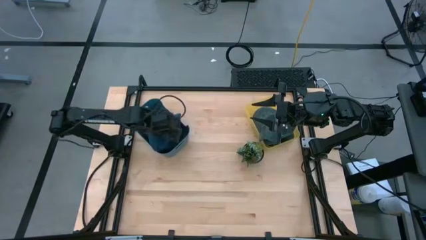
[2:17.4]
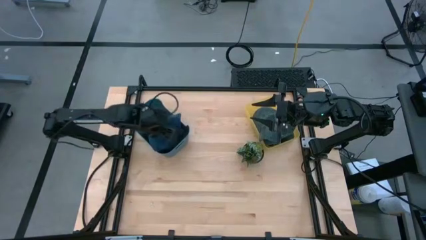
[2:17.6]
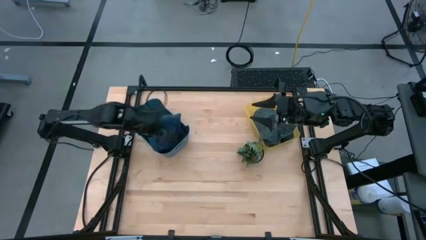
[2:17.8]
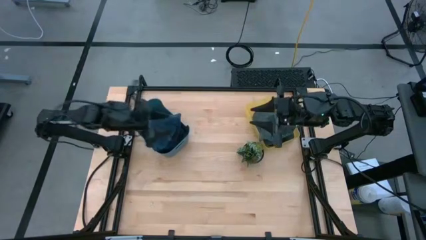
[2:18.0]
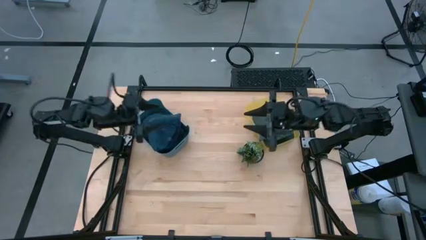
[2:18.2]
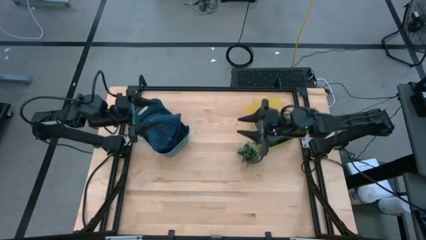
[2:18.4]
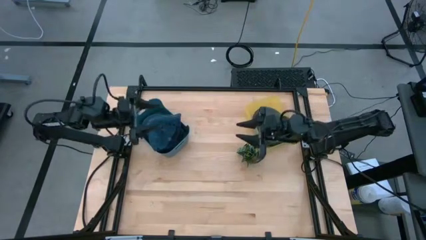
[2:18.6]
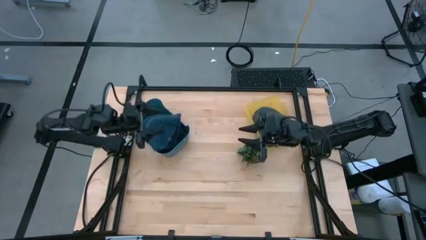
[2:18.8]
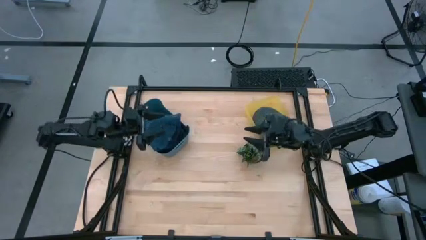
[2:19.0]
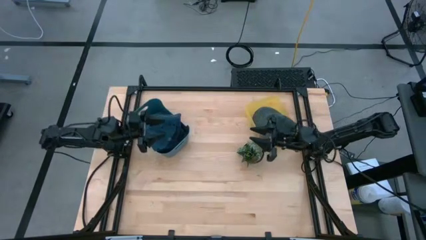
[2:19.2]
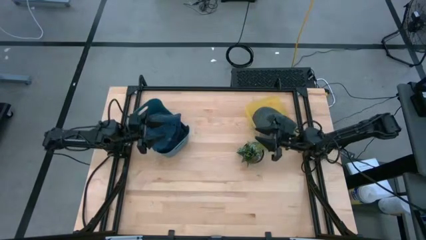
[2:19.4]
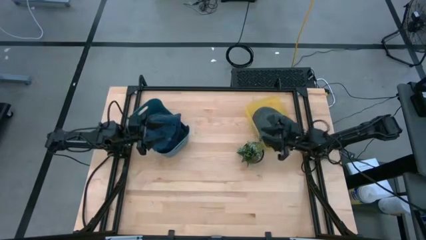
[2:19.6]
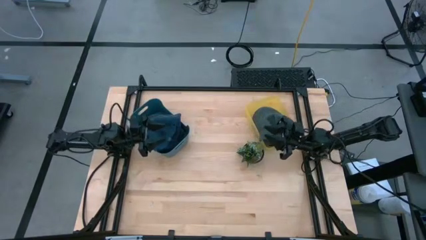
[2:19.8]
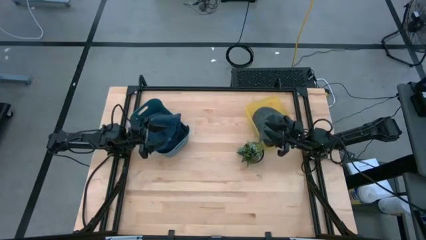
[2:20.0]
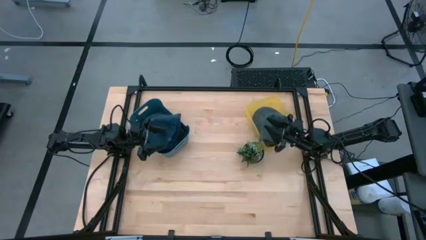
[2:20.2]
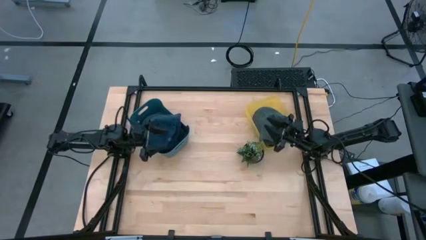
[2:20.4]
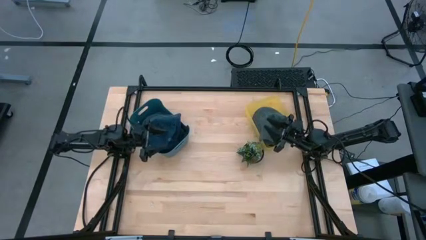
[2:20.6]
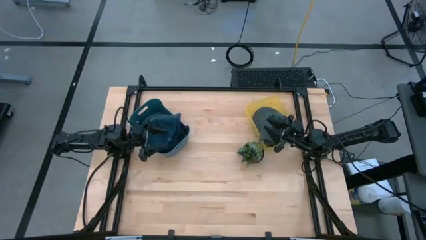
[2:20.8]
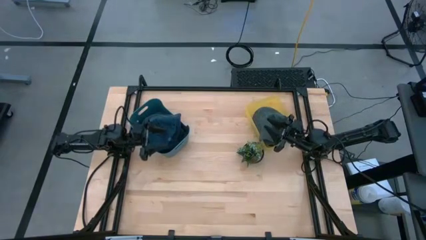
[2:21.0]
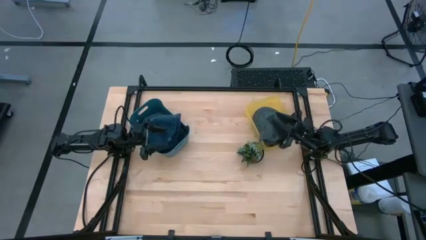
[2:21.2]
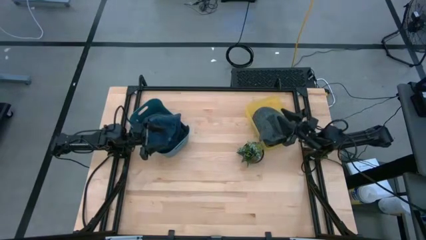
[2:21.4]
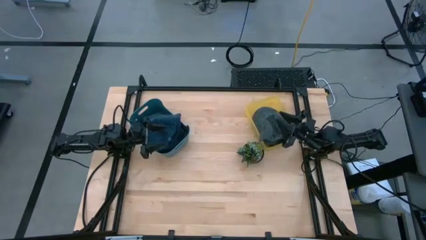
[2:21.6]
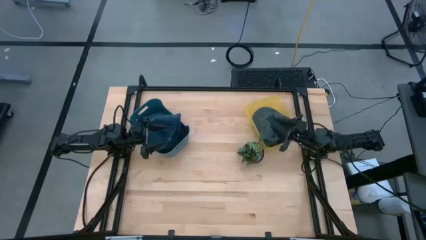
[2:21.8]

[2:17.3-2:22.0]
Task: Pick & Place hat
Return to Home Position

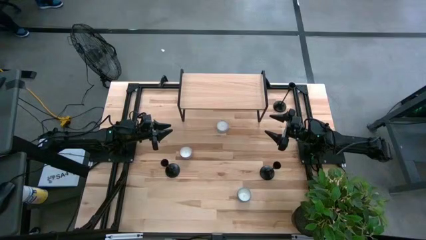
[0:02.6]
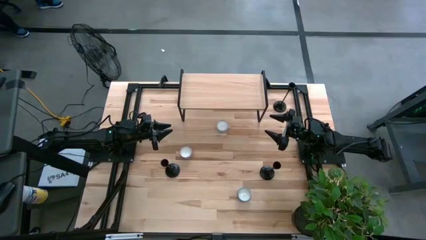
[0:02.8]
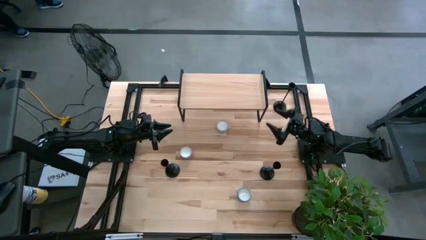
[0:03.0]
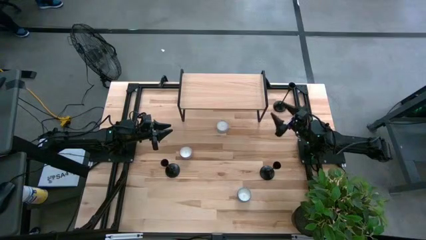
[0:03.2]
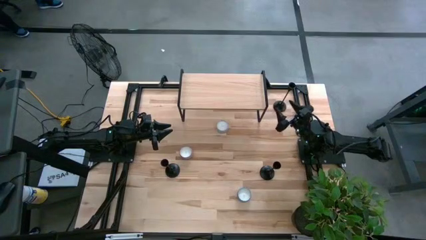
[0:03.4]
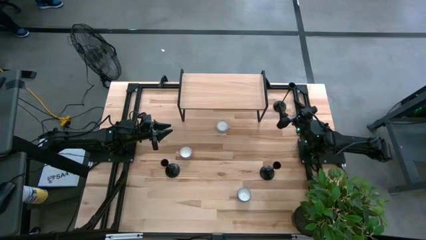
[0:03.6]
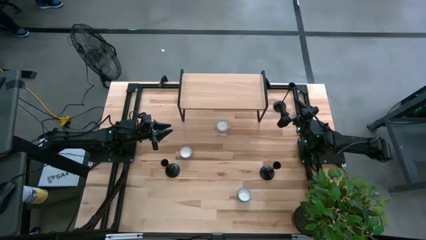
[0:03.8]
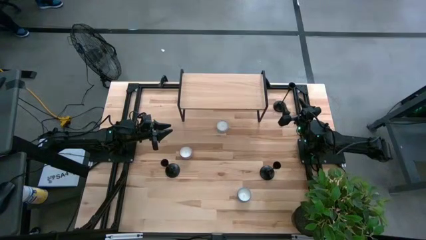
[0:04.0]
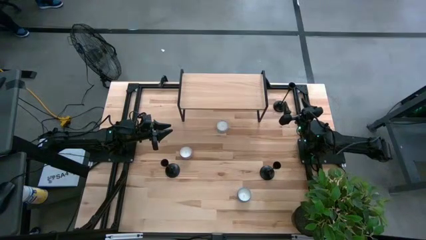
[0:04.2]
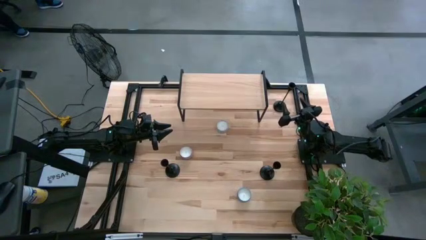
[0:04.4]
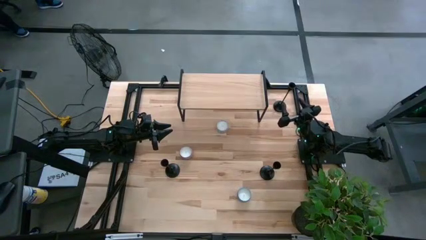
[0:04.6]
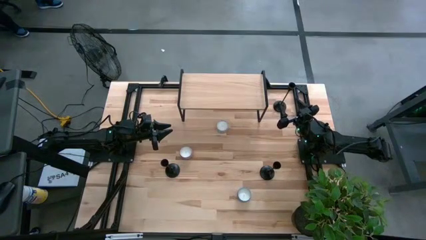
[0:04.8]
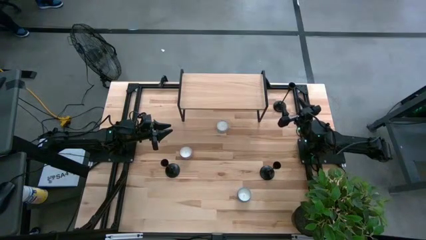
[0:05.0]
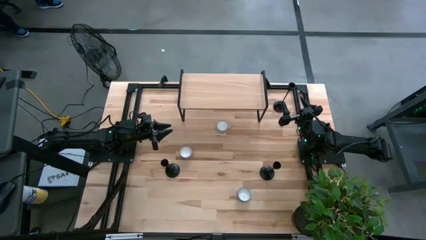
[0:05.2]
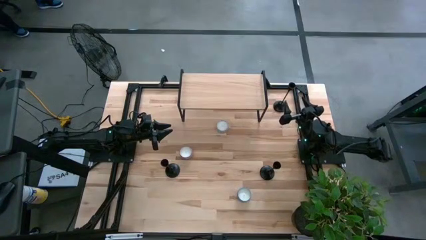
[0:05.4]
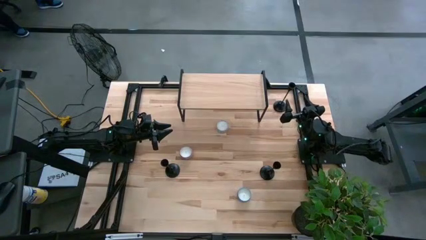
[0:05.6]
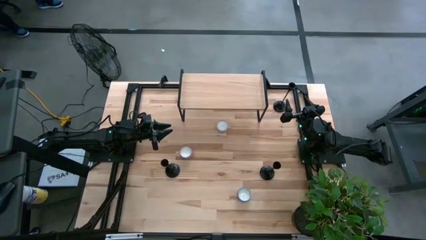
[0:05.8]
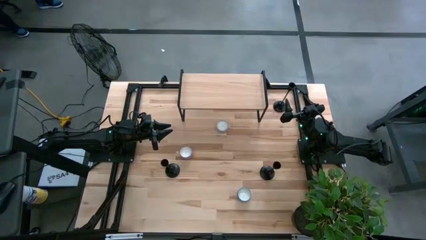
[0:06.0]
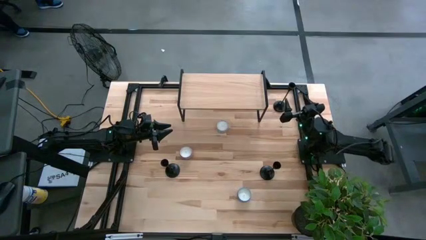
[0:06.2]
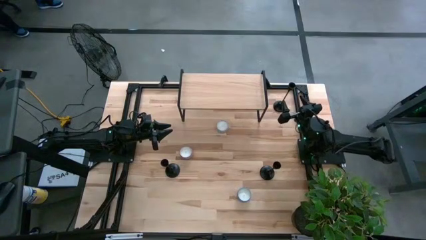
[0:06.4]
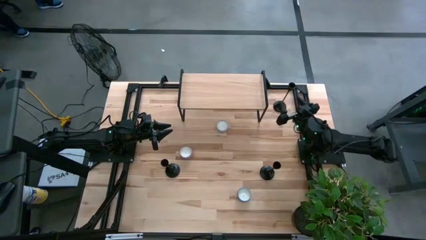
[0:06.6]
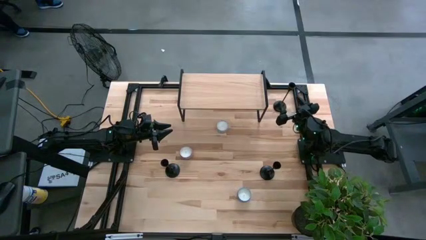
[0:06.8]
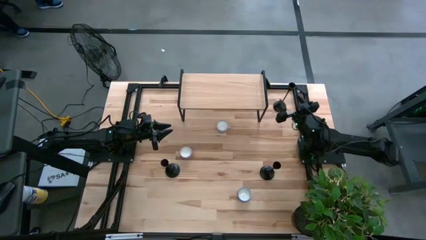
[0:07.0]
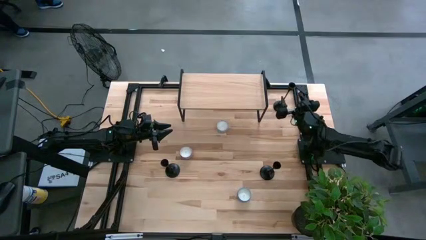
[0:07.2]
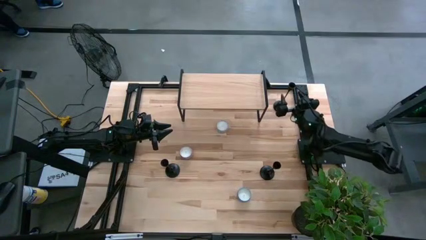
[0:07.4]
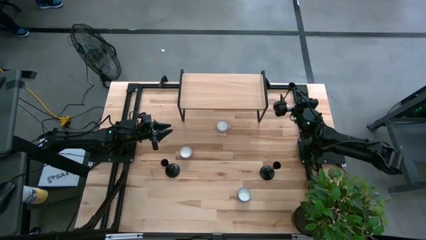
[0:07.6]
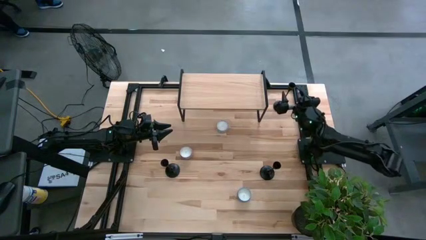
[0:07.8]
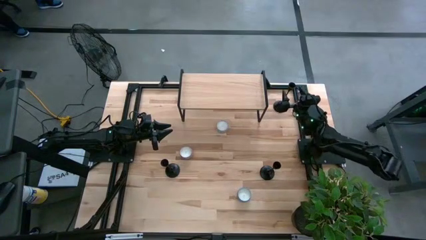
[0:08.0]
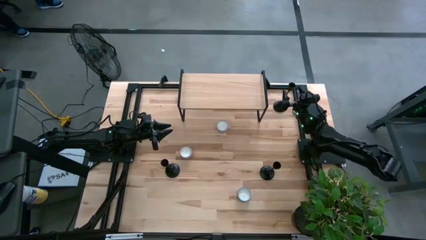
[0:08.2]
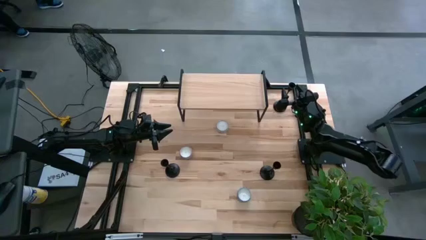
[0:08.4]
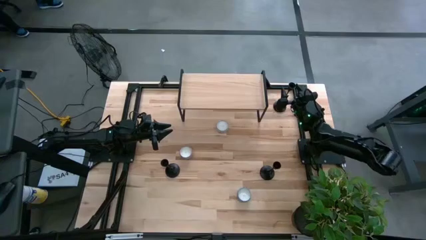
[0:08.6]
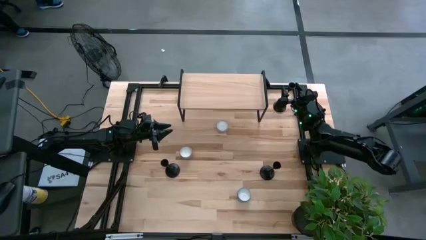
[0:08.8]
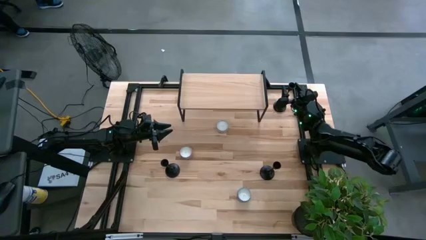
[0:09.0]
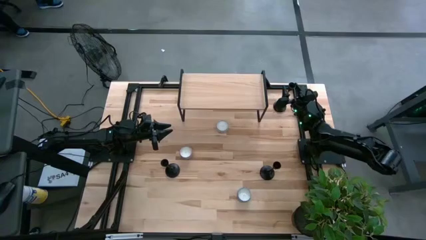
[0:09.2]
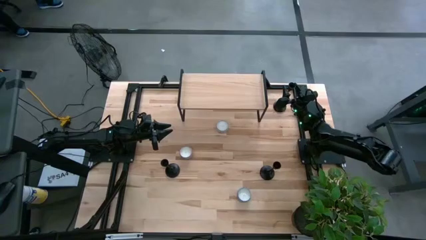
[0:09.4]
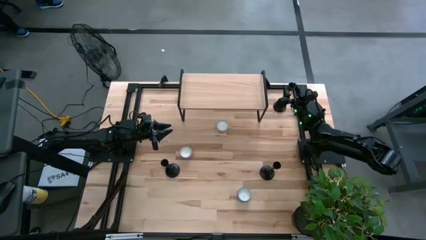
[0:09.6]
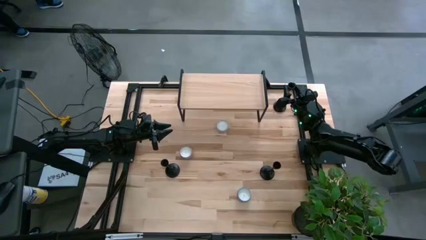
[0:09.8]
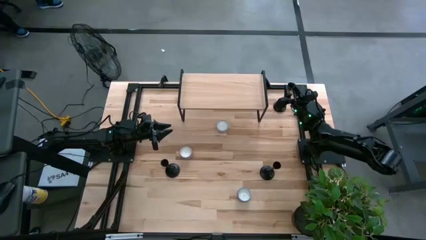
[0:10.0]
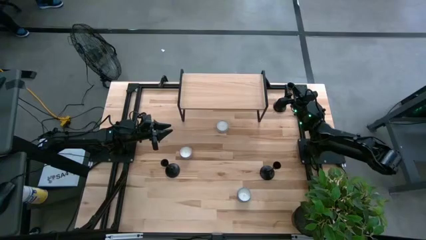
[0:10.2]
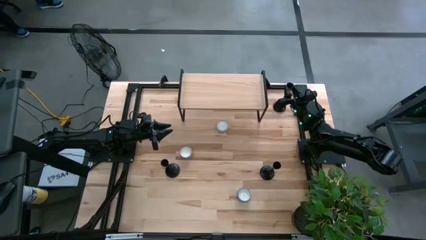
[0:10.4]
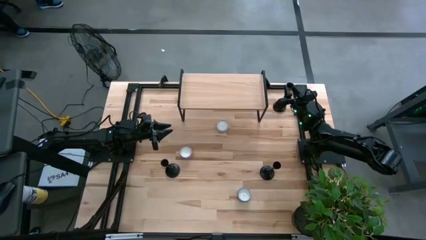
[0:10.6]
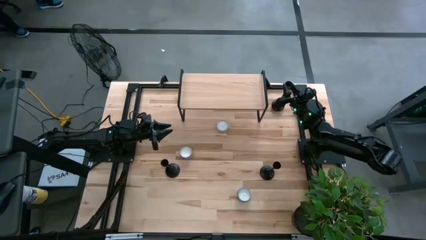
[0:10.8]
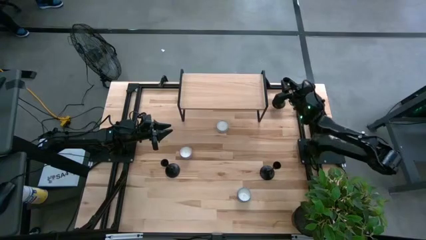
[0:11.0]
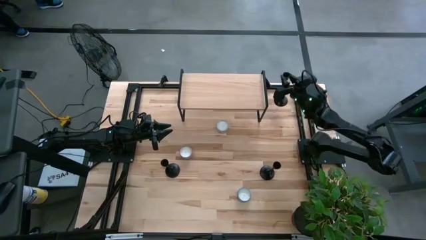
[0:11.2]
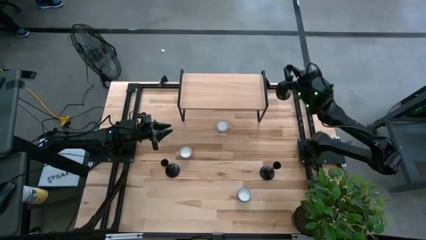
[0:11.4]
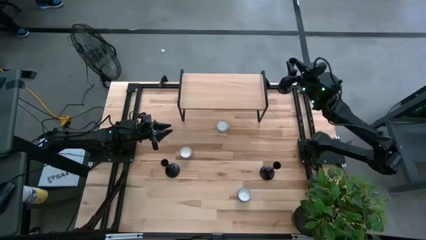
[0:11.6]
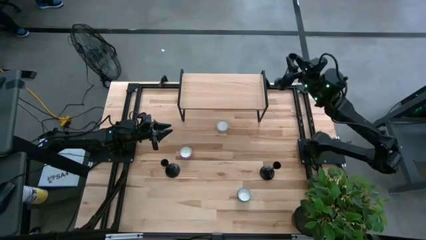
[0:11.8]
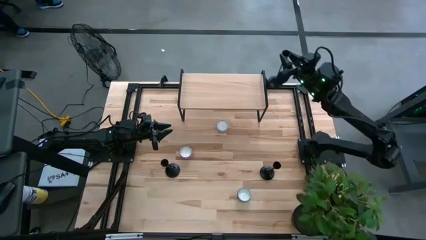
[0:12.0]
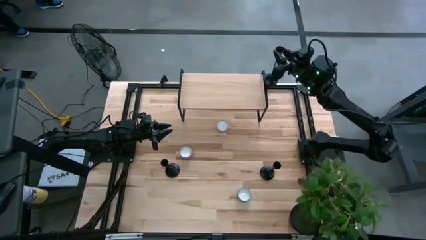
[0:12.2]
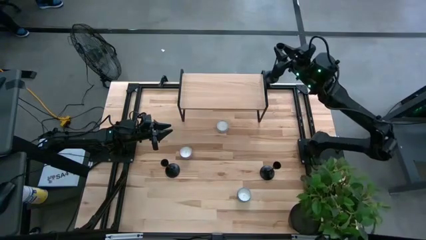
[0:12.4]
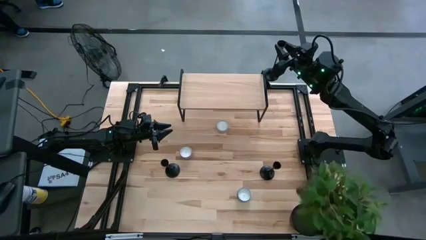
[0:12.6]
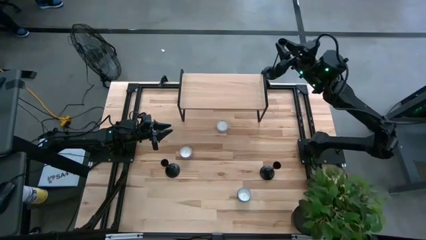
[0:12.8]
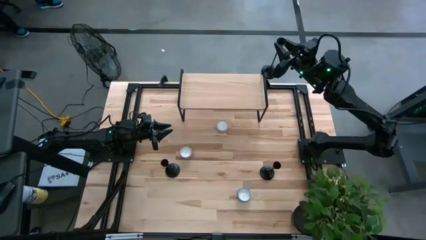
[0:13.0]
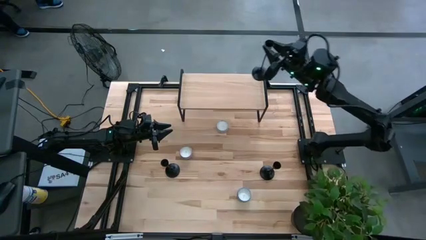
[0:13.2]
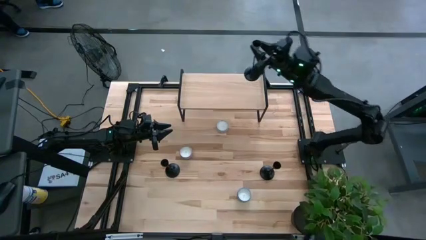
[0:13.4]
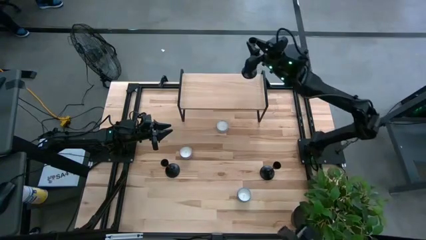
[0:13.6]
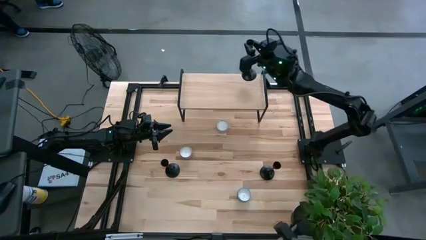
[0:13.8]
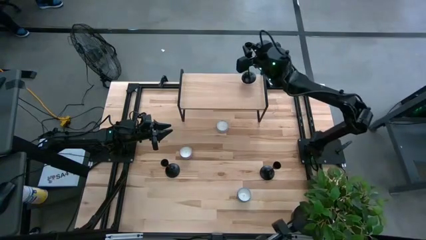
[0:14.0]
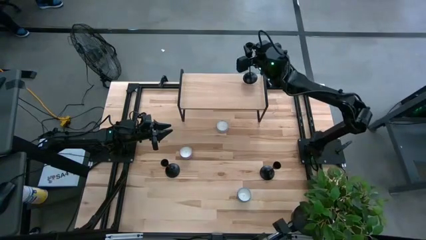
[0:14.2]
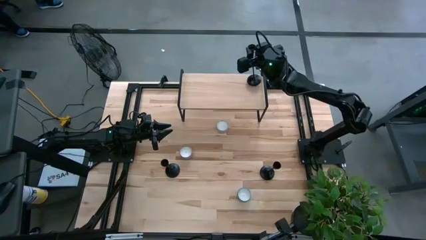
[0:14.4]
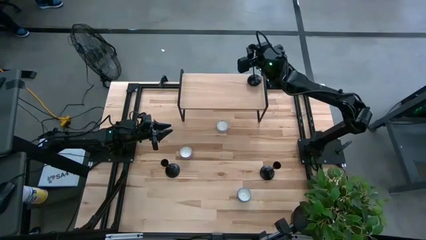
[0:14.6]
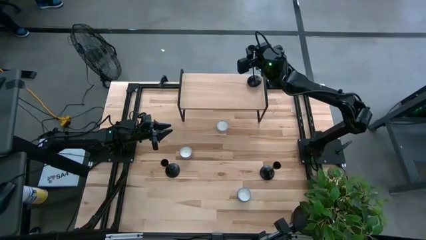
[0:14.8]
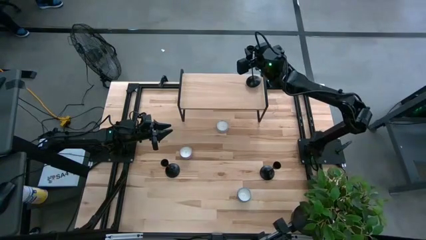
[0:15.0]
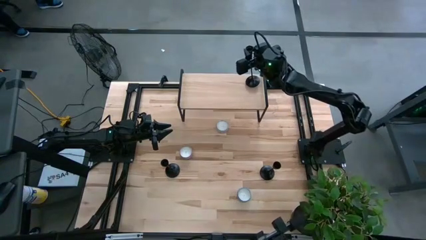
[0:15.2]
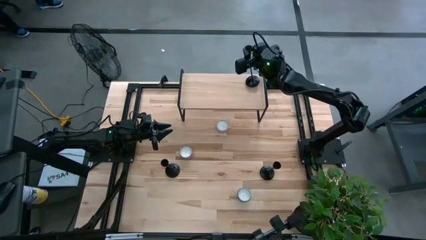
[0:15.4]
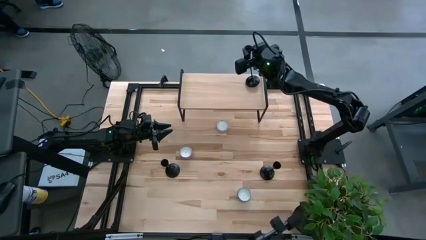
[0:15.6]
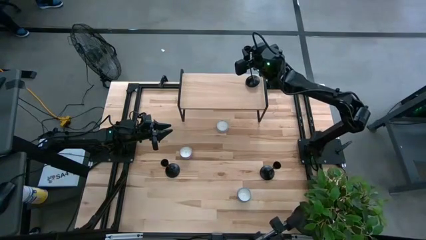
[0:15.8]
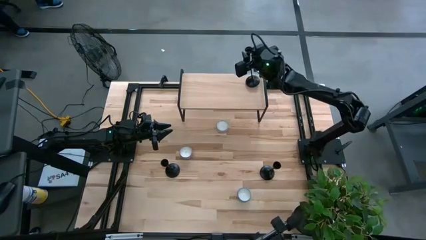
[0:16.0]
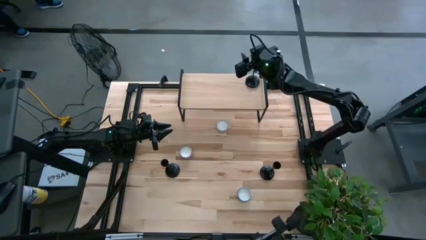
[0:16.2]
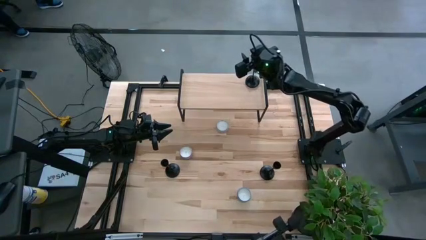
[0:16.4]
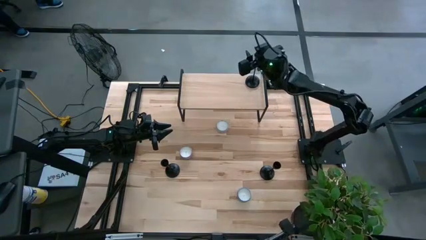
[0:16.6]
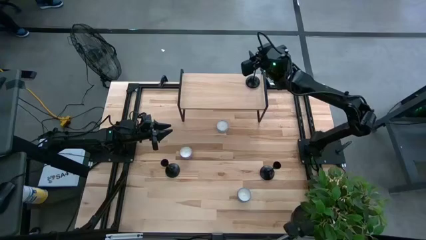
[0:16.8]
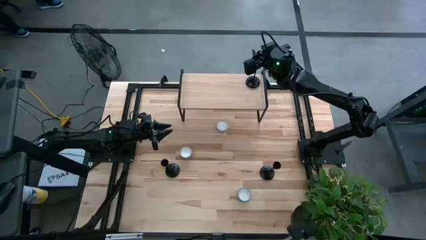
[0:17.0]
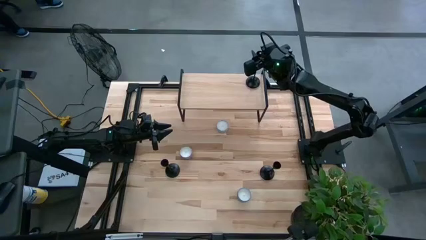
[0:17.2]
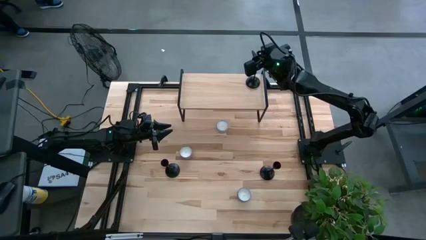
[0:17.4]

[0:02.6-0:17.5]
Task: Pick & Place candle stick holders
Put the top black candle holder on the shelf
